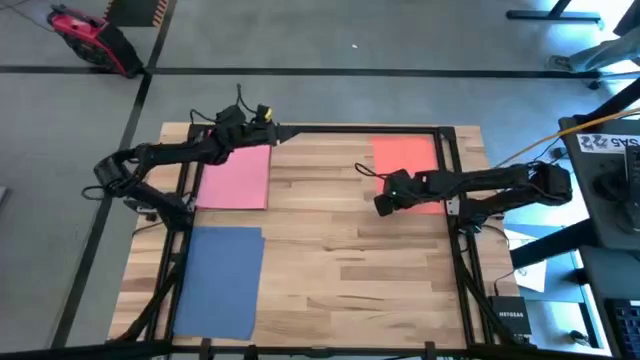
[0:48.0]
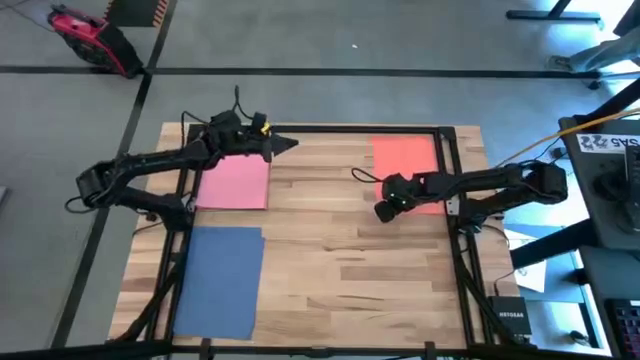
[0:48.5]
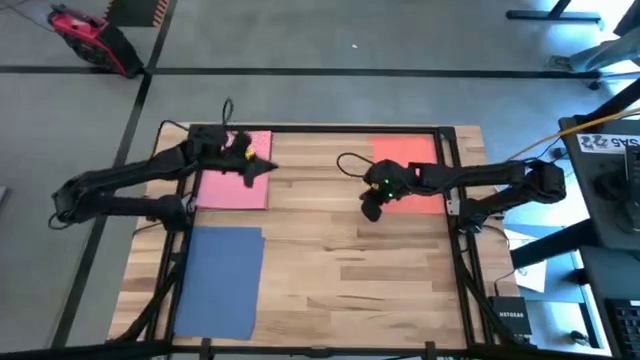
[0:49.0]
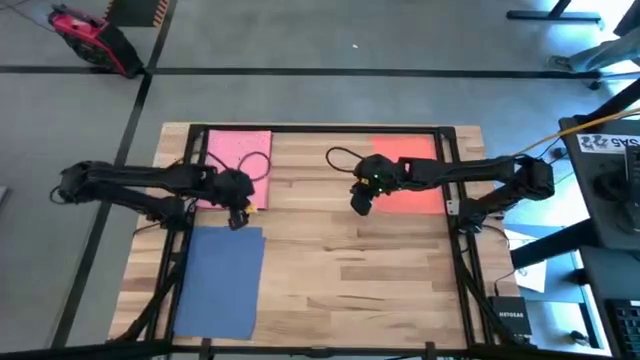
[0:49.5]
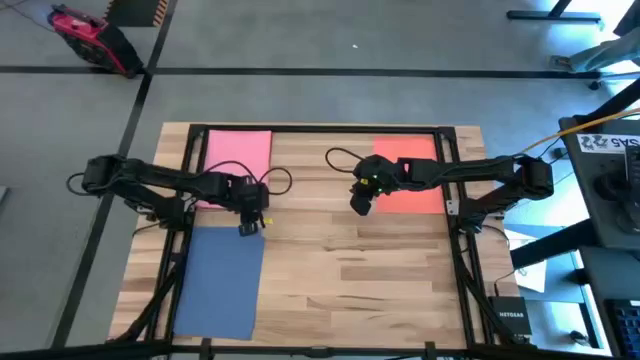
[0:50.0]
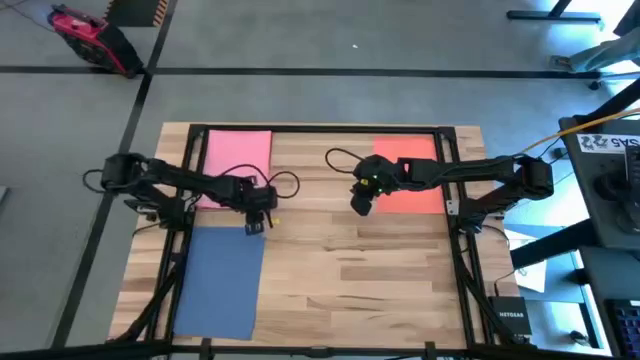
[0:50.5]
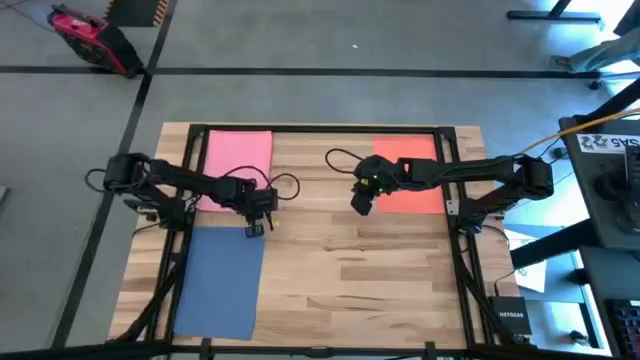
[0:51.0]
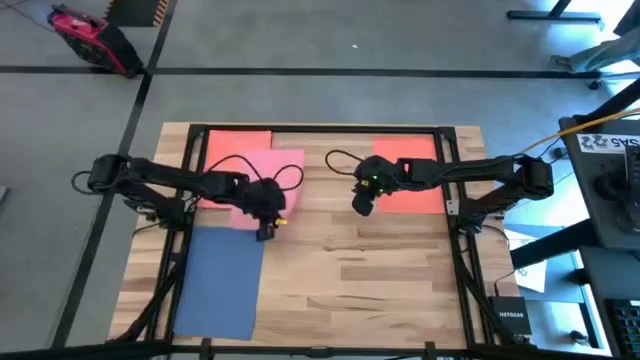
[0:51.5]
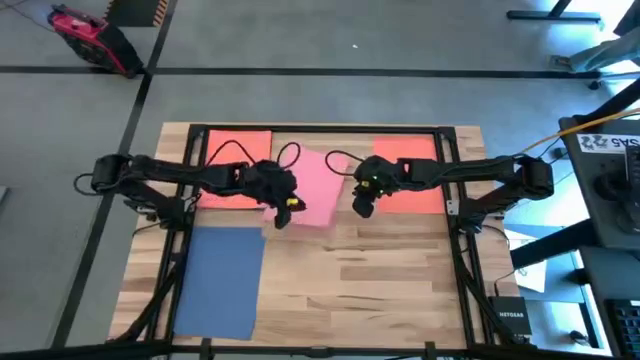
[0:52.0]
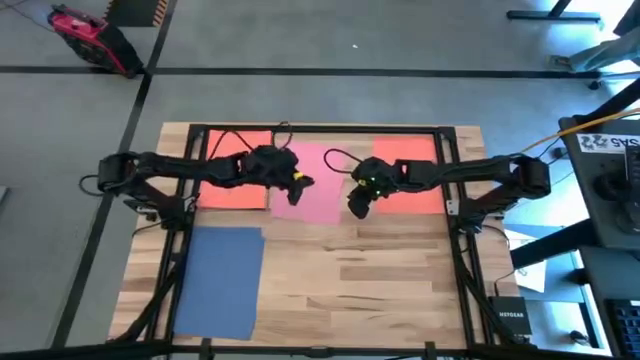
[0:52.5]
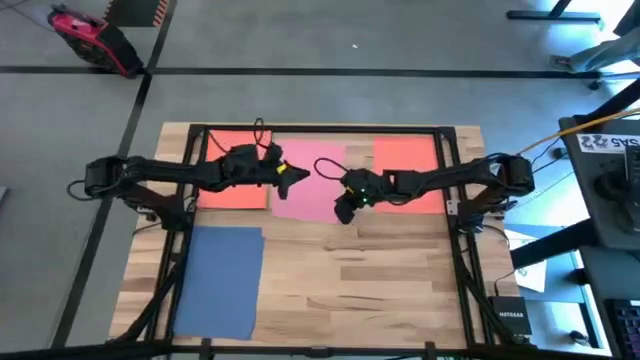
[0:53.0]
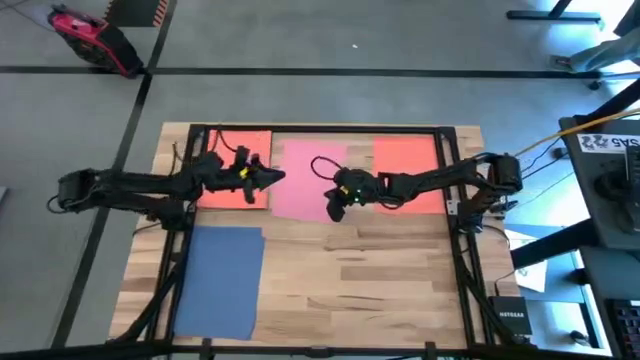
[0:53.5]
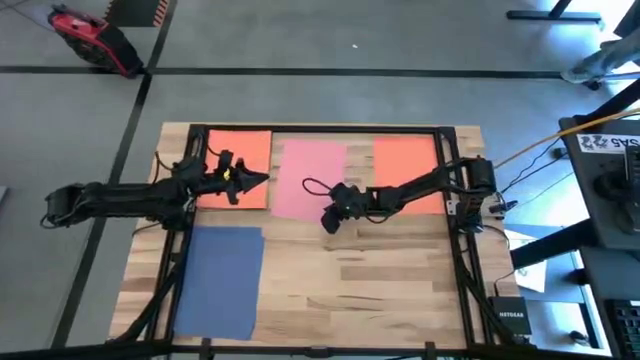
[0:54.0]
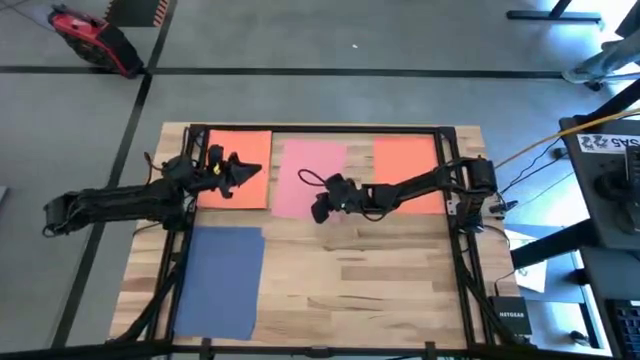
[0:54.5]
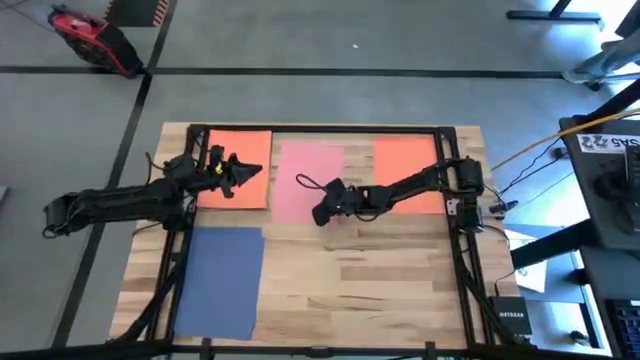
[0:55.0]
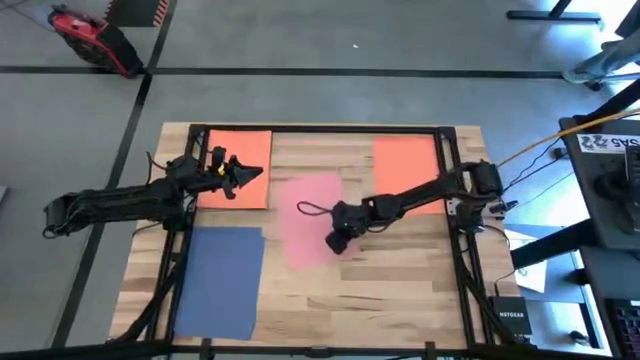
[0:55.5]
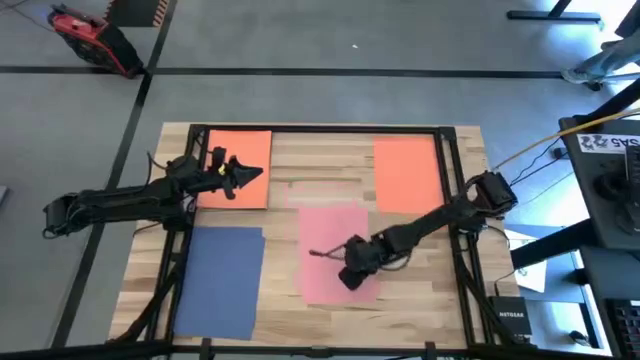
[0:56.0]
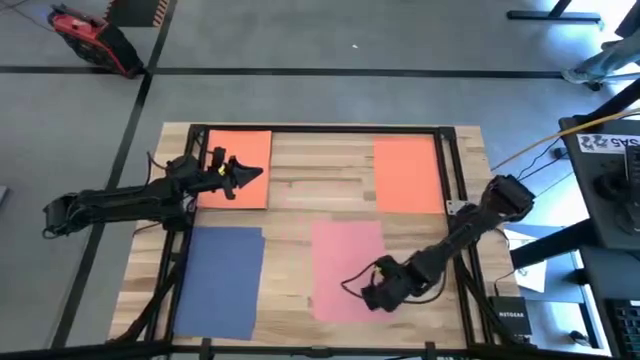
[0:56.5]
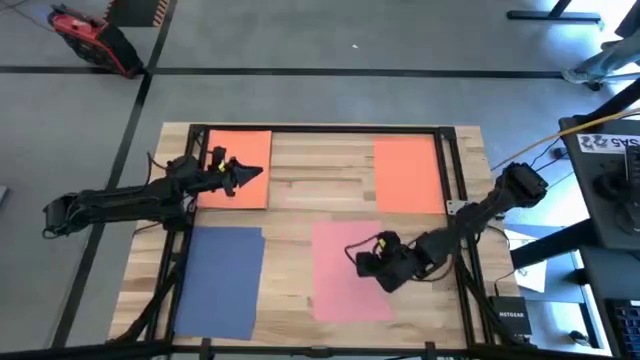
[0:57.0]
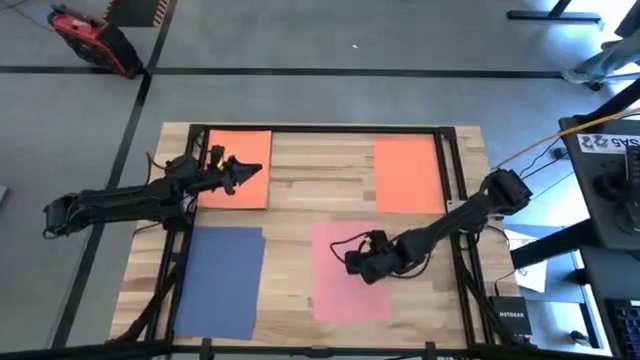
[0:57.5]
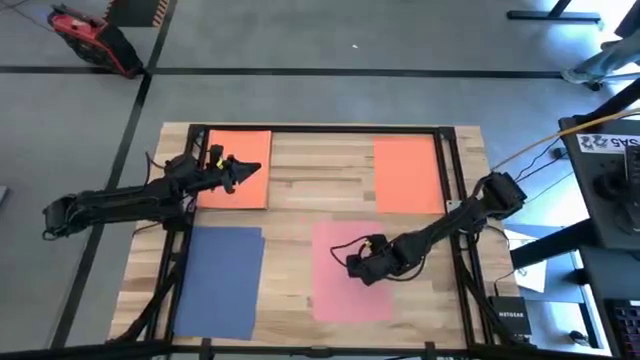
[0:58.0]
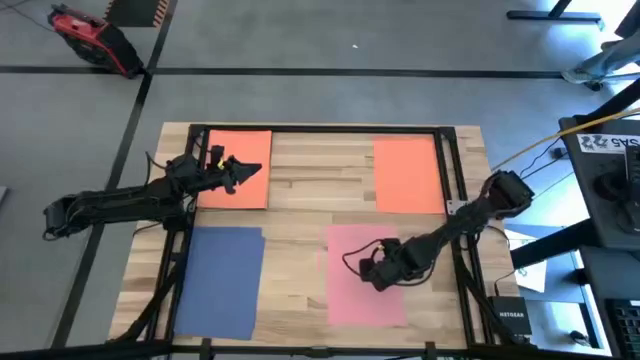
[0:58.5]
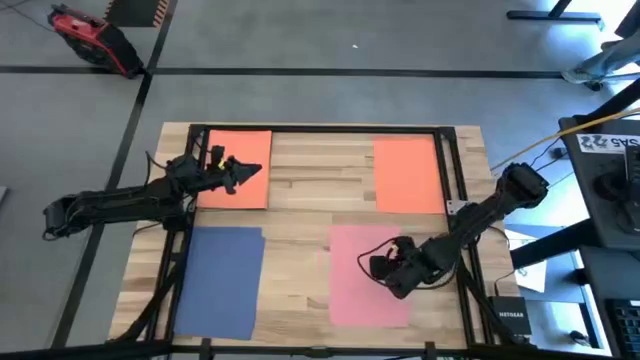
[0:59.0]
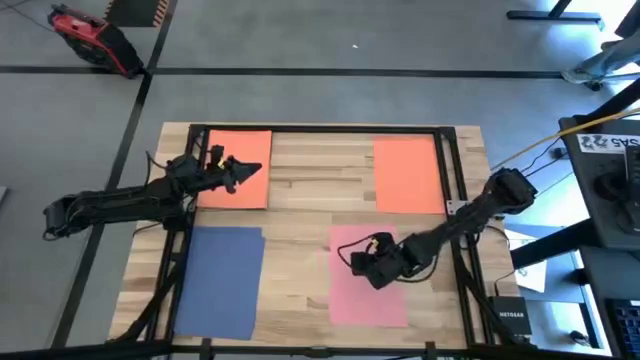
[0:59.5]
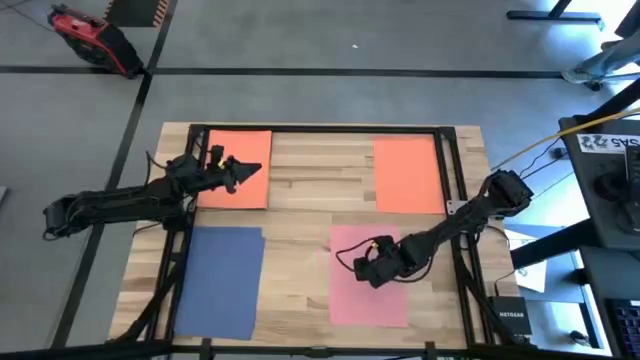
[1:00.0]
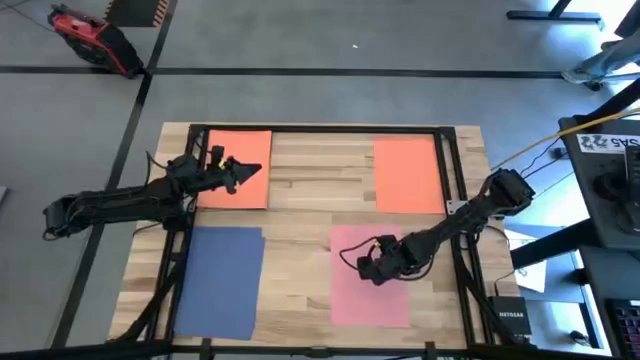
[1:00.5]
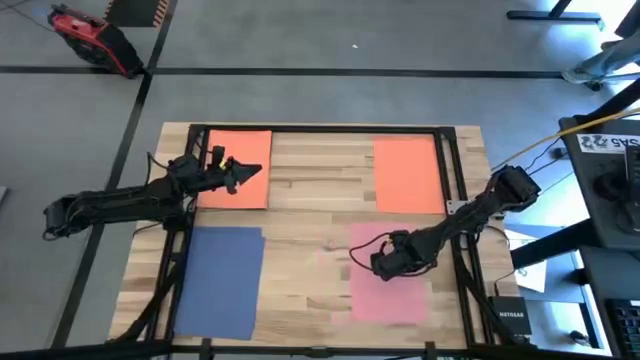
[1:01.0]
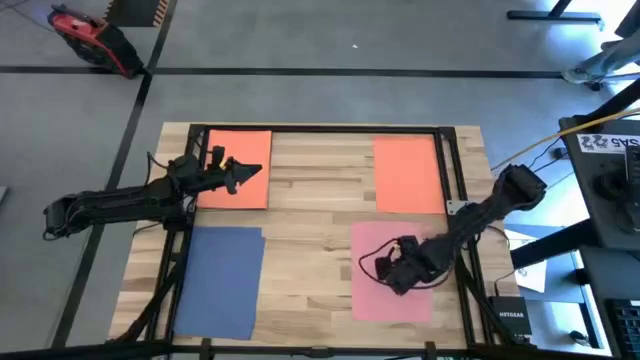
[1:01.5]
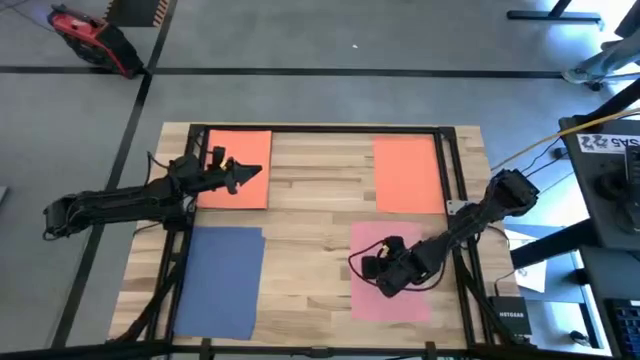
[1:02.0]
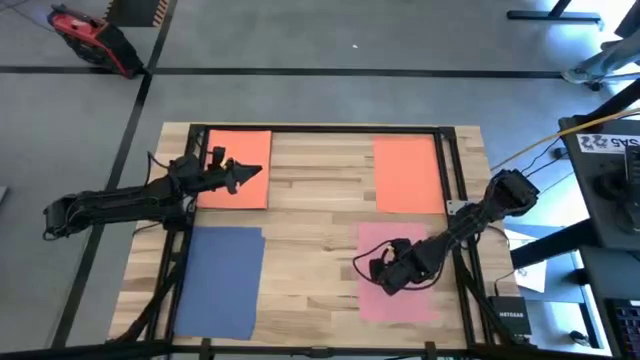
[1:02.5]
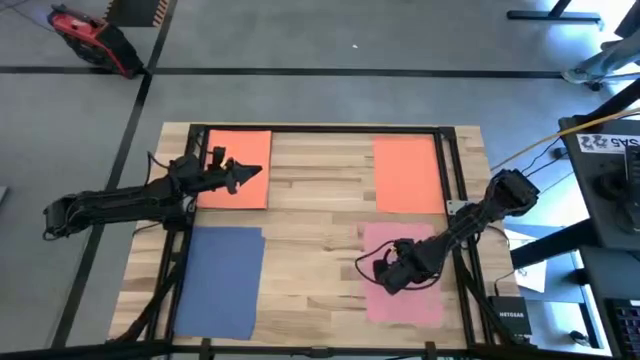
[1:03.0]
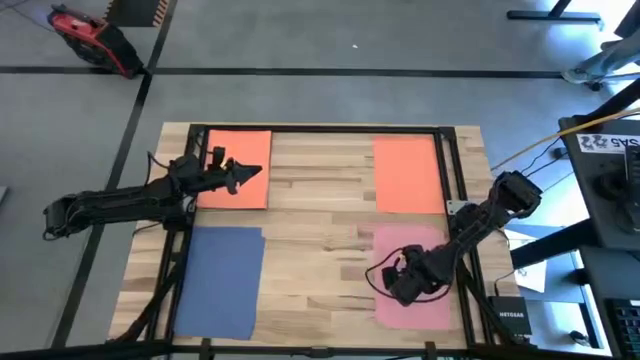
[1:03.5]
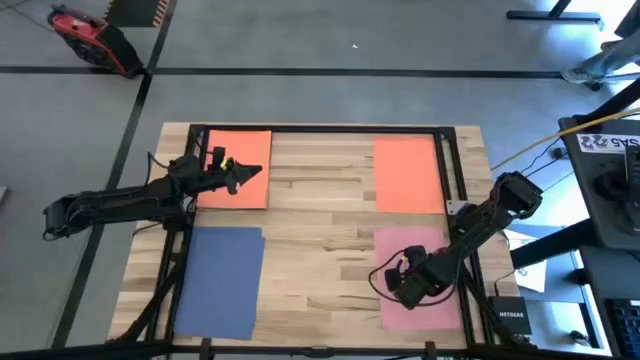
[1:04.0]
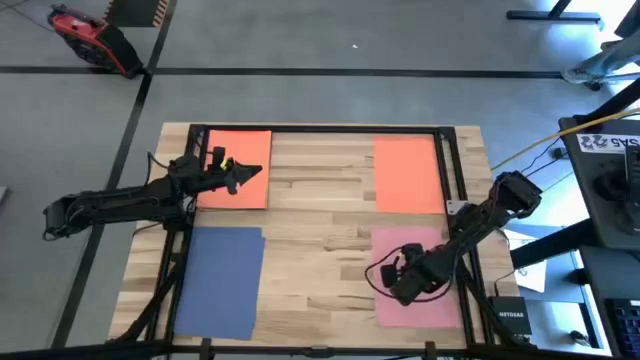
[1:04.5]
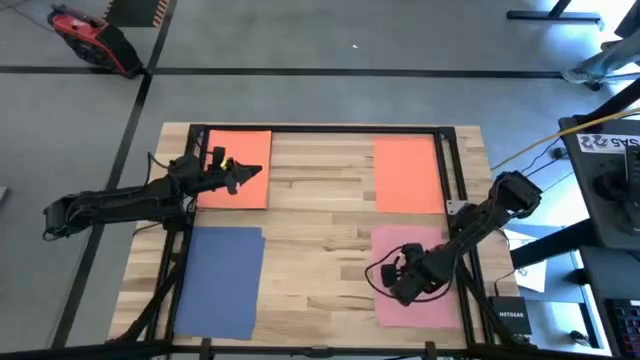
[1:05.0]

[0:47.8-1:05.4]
Task: Organize paper
Move the pink colored paper on the bottom right of the table

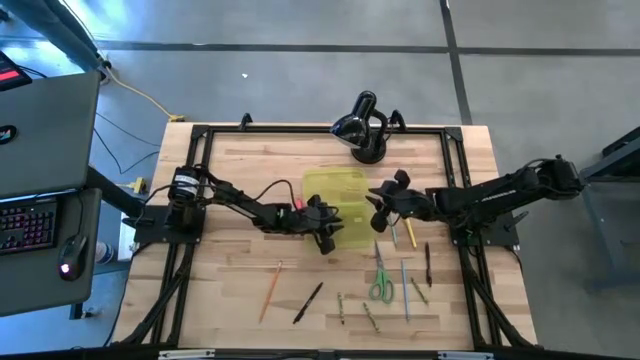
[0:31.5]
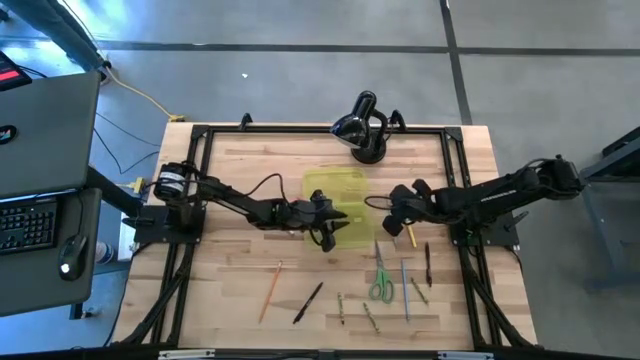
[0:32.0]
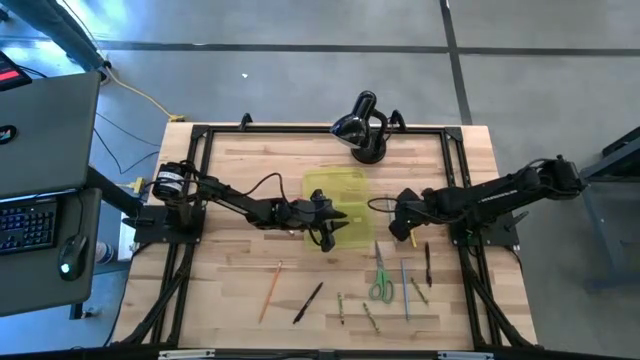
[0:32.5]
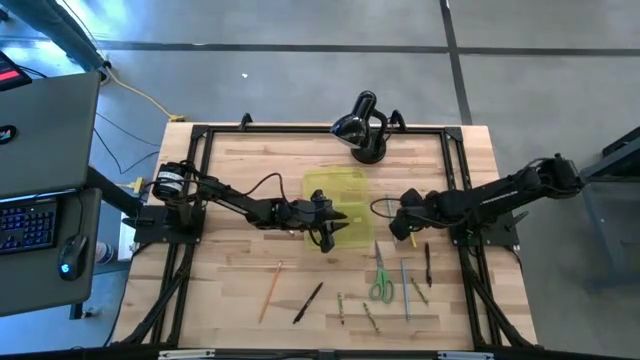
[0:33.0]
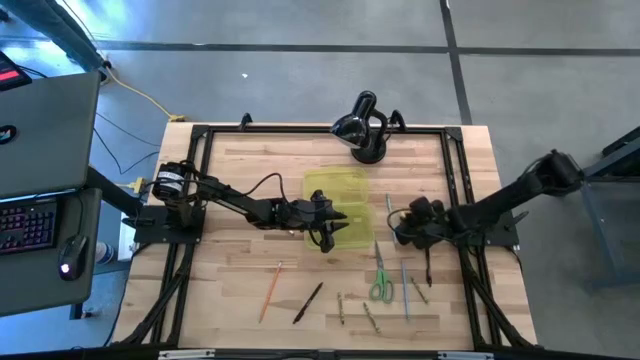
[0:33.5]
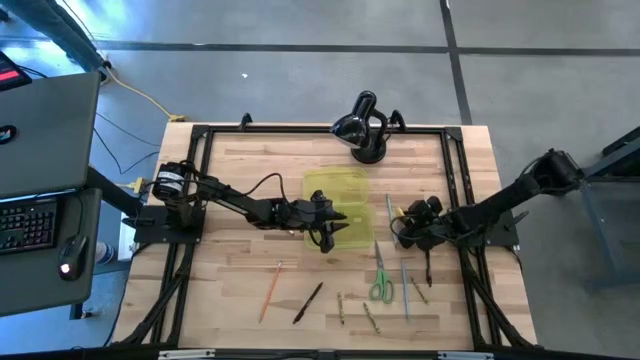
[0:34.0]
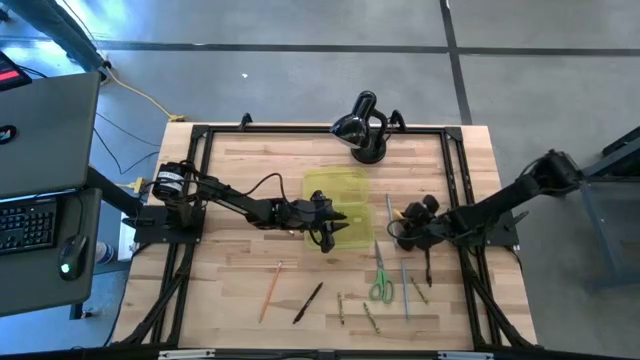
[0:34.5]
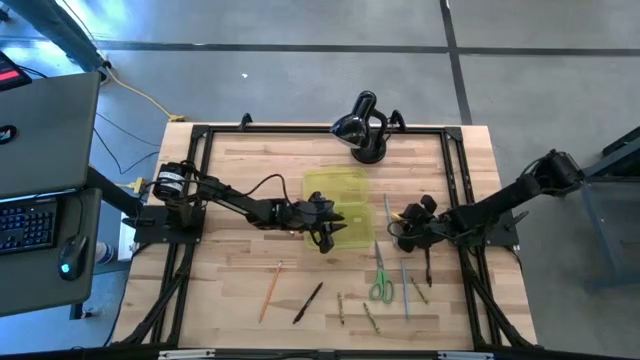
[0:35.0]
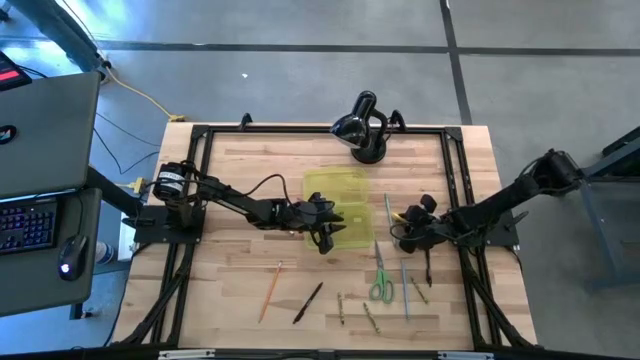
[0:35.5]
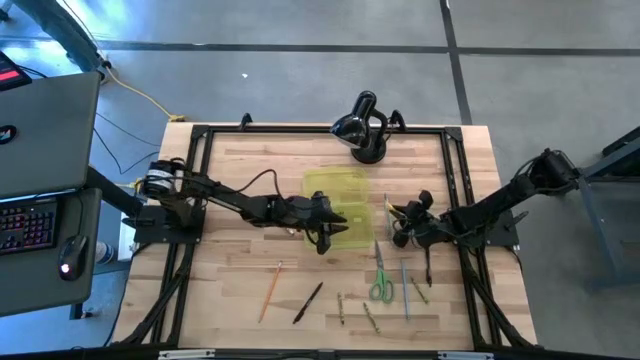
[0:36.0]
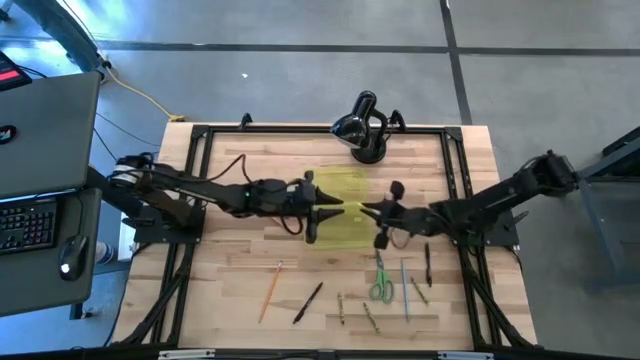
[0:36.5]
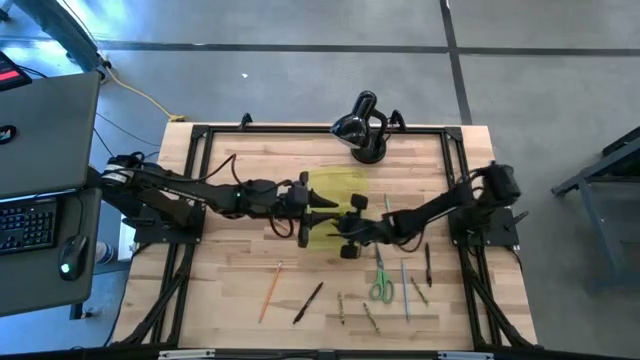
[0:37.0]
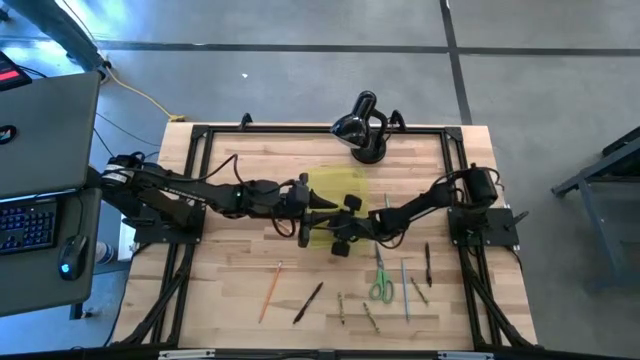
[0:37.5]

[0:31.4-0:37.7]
Task: Pick & place school supplies into a supply box
Put the yellow pen into the yellow school supply box
